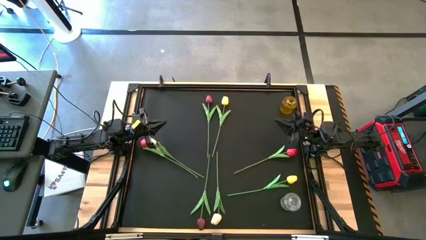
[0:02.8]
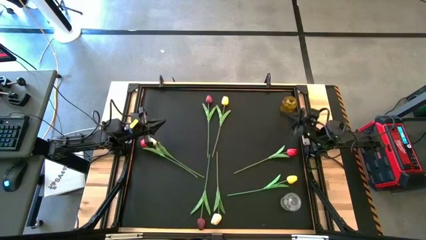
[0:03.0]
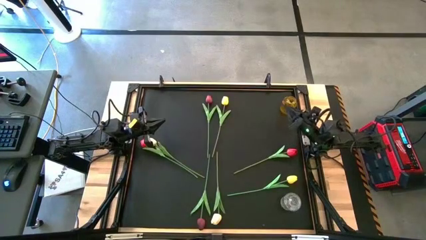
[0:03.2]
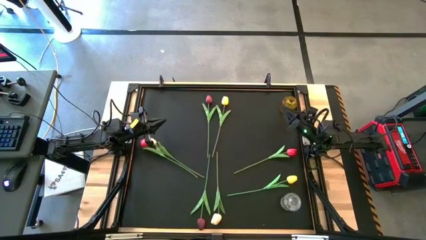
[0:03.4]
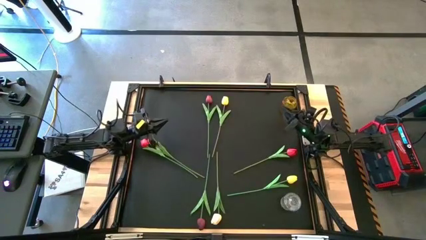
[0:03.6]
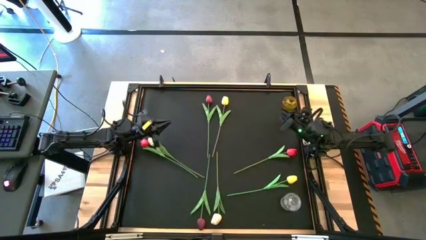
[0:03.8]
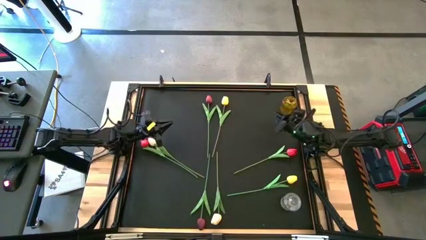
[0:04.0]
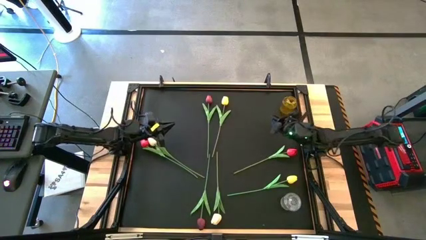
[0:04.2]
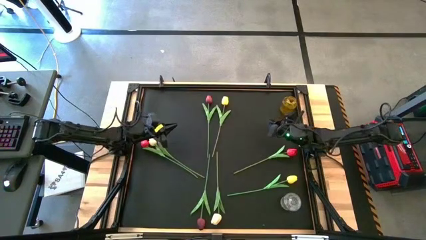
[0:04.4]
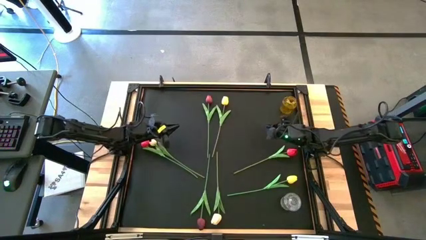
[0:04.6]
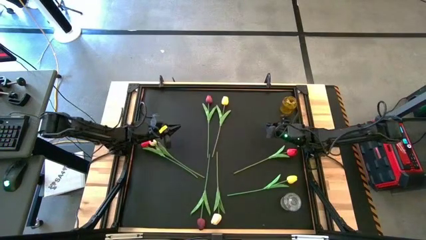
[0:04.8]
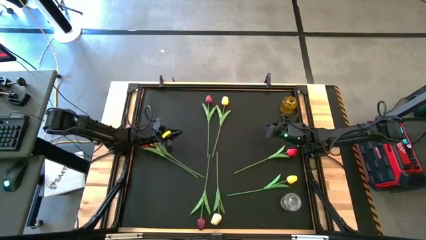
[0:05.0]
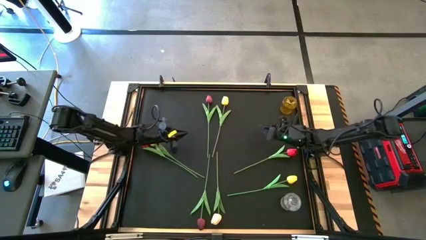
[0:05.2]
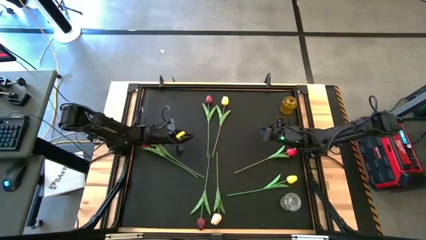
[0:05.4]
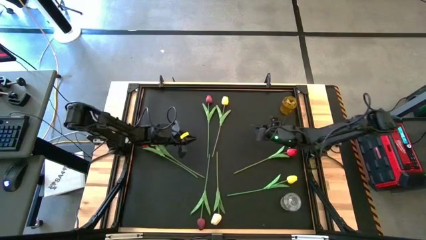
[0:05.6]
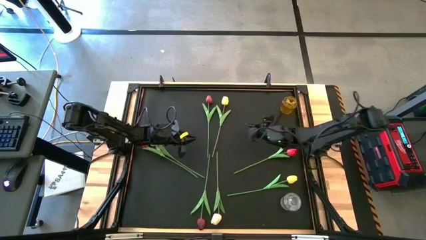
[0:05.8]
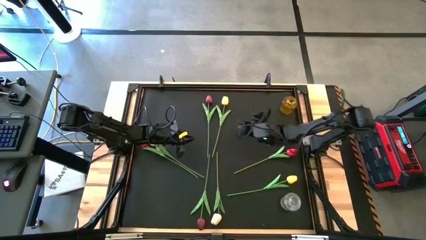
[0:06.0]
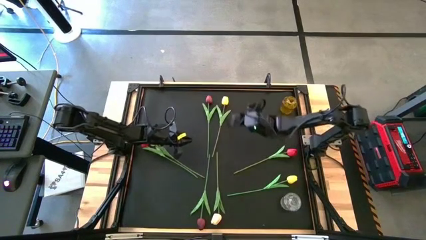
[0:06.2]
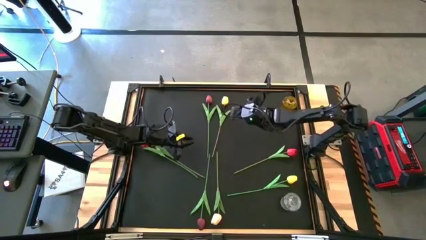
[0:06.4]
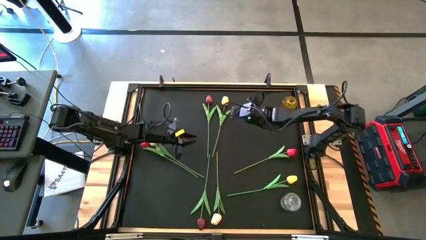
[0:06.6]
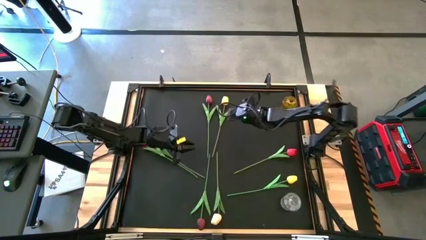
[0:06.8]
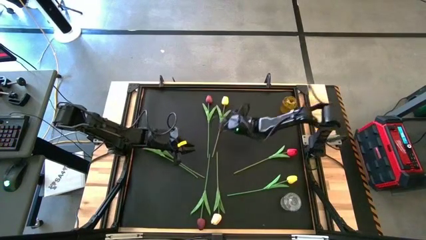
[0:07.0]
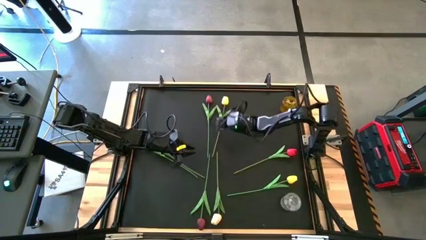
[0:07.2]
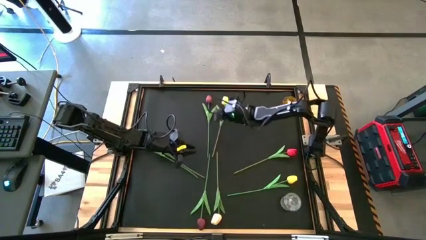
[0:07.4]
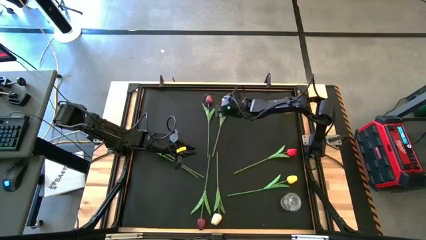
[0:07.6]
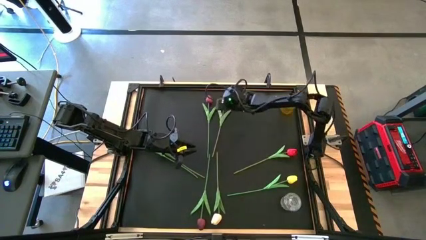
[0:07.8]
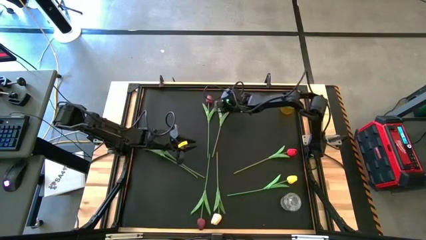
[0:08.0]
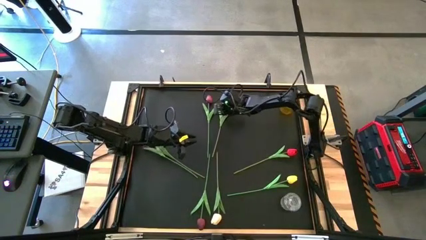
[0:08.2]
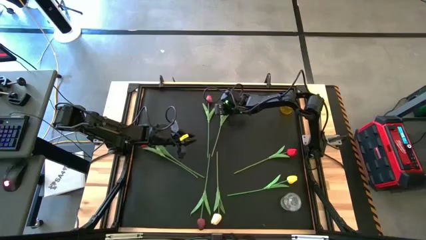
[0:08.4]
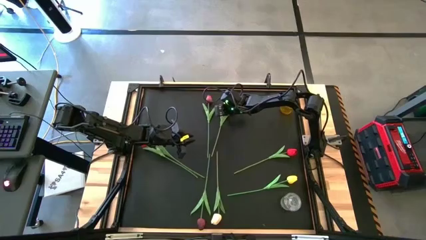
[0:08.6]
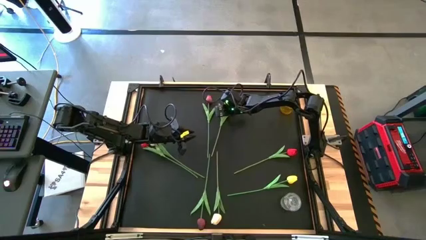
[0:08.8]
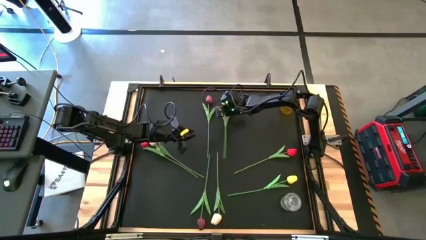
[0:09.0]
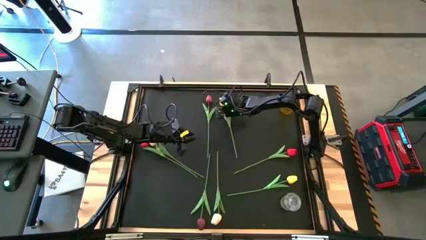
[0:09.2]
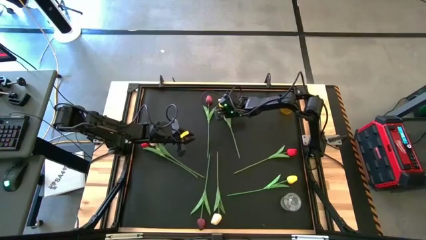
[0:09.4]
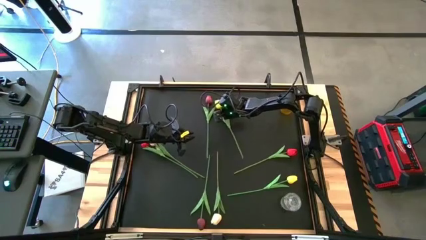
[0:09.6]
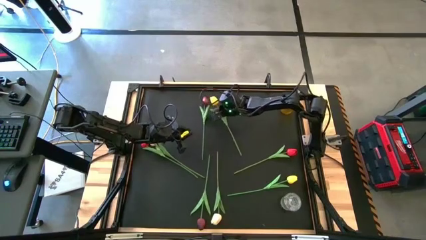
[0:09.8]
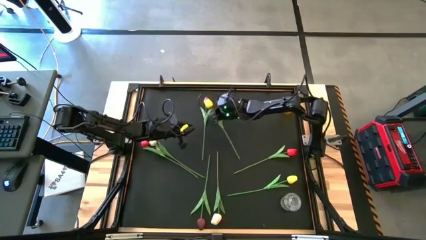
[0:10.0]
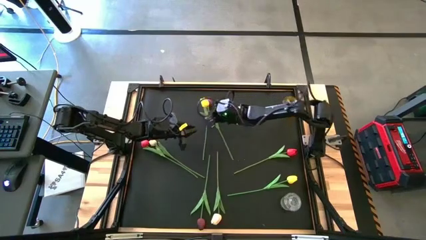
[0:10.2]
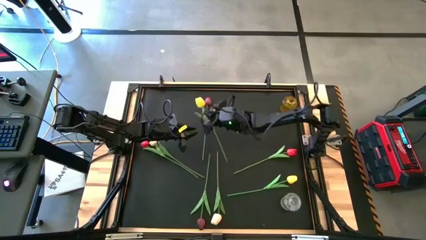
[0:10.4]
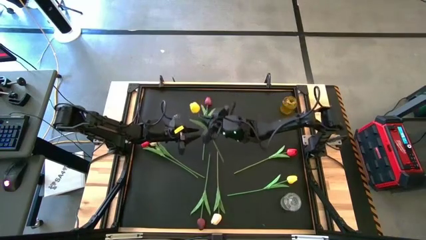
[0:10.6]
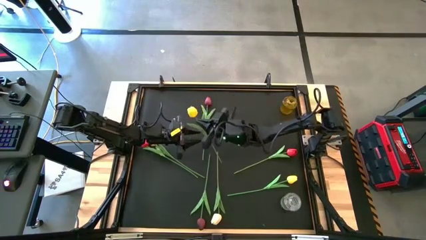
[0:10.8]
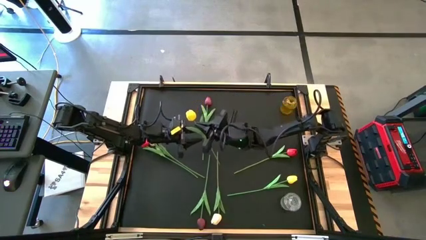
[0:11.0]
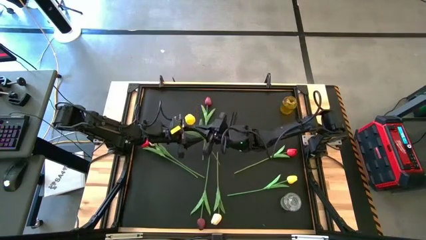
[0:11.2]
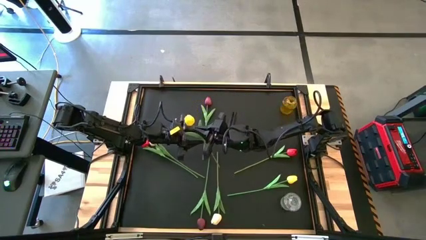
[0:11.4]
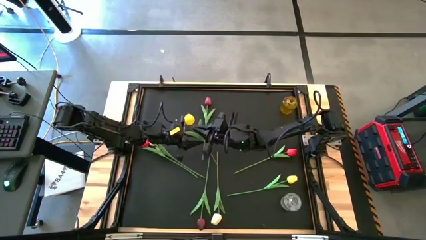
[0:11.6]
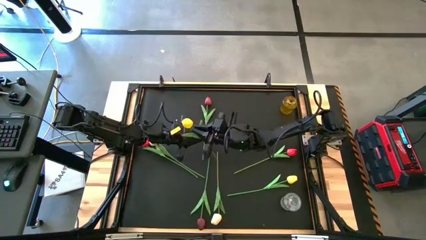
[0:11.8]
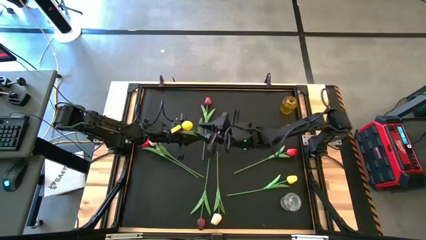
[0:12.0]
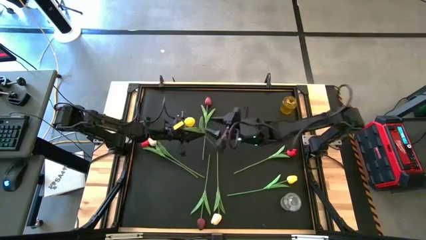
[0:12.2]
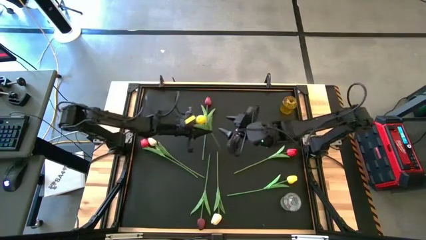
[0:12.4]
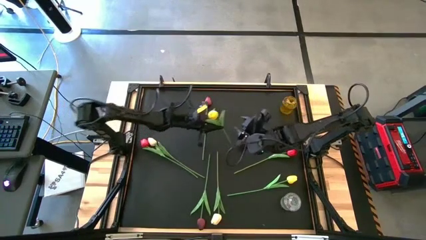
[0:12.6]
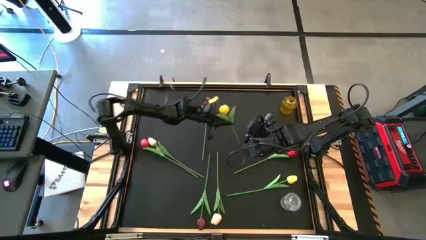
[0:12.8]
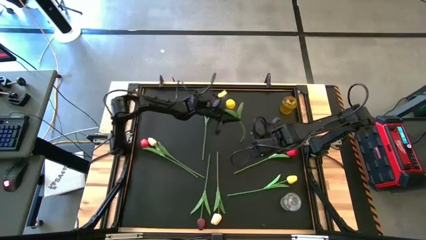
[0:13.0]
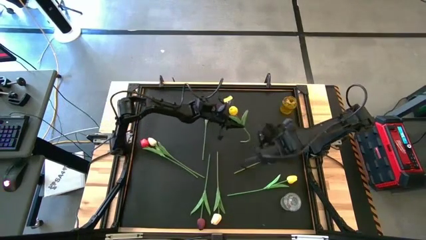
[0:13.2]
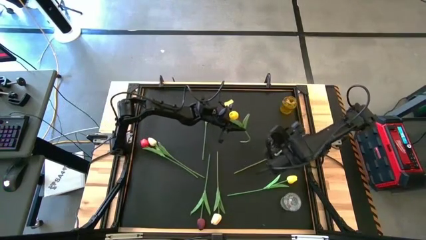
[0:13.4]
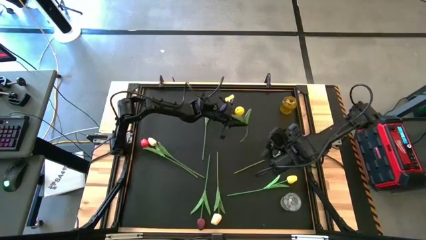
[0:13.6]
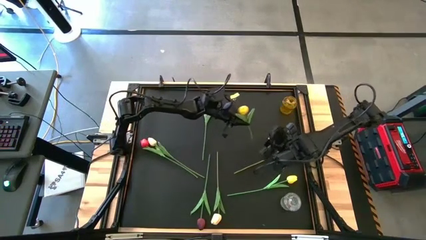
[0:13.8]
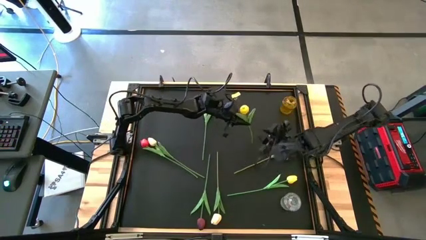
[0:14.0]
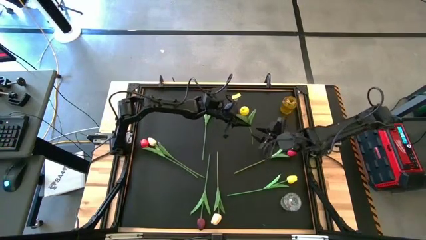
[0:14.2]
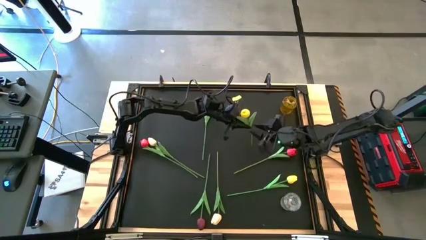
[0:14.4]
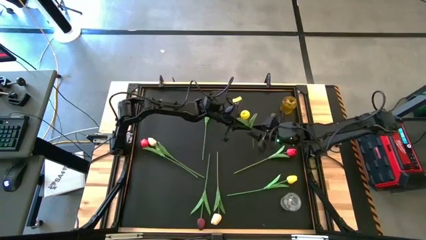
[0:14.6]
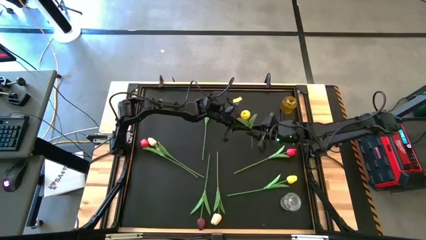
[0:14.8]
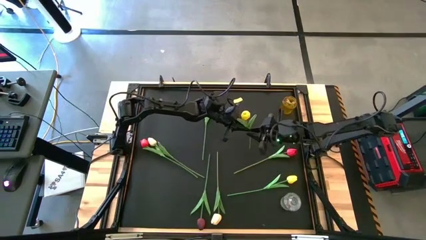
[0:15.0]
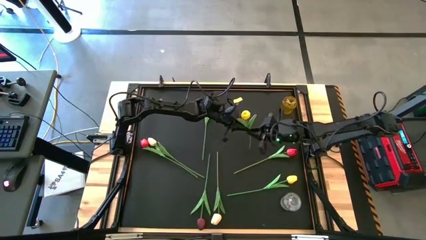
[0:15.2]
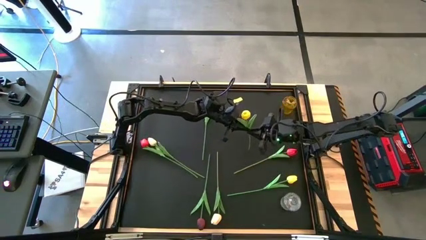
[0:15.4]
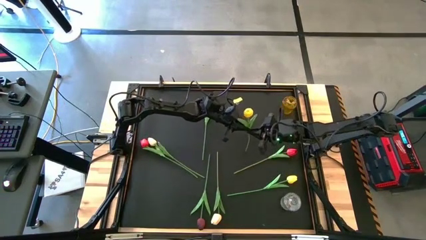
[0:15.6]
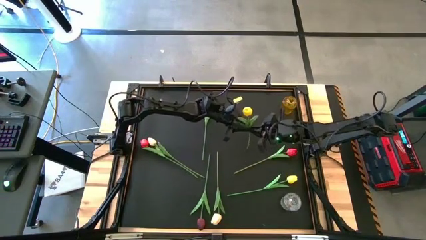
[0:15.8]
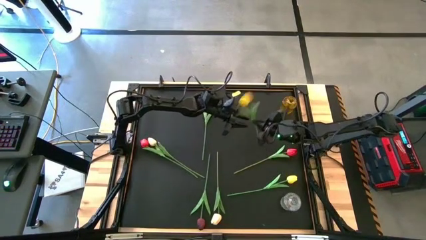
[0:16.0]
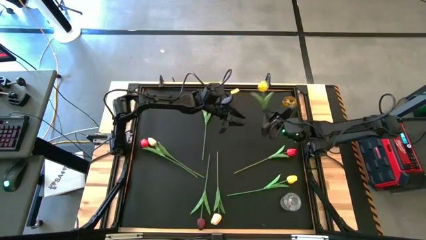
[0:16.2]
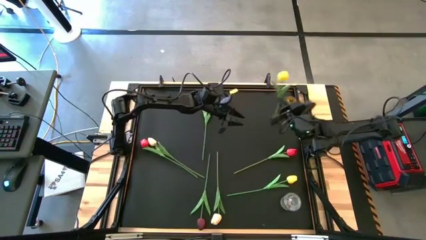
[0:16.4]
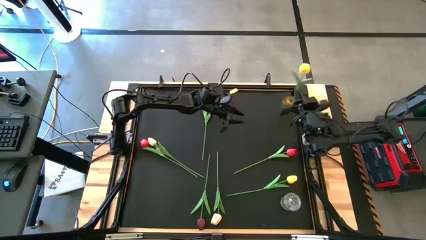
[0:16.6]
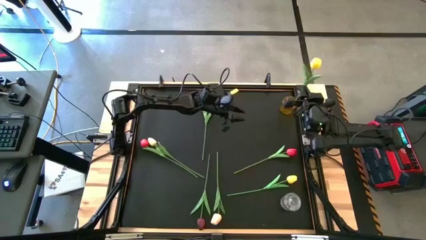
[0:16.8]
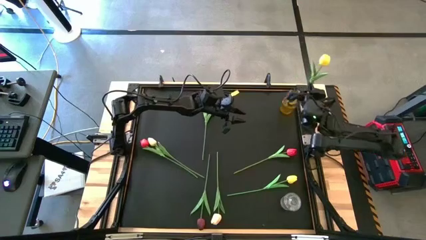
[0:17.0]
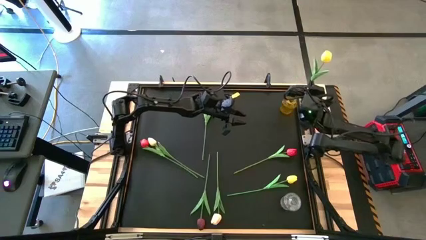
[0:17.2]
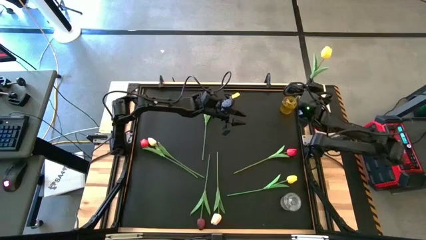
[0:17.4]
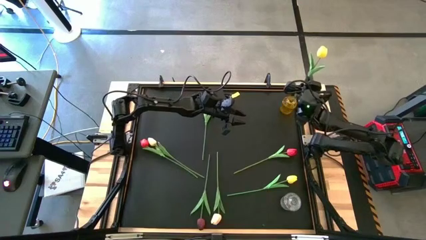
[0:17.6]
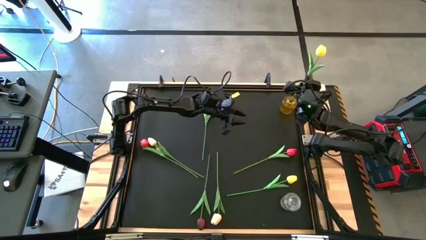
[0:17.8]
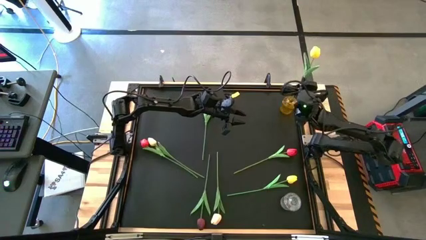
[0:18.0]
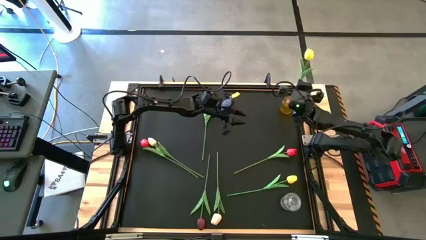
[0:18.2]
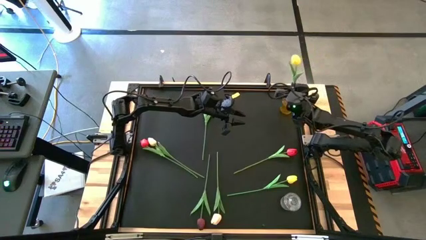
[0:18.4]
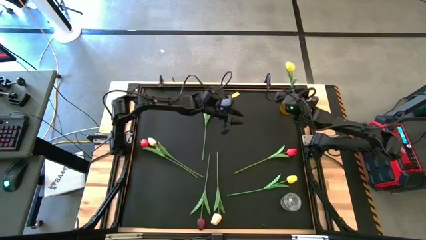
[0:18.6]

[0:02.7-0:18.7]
Task: Sort flowers into vase by color
Put the top yellow flower into the yellow vase
